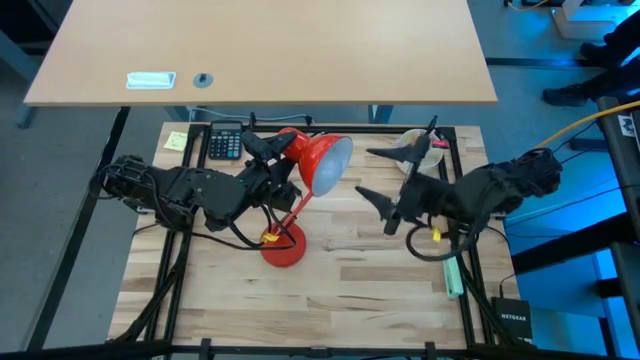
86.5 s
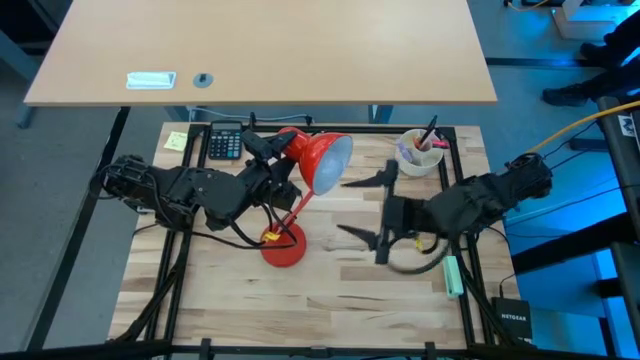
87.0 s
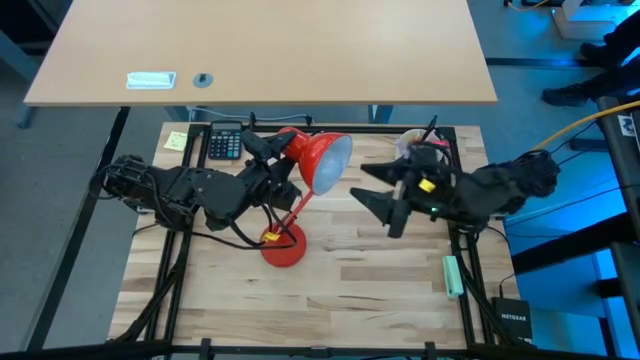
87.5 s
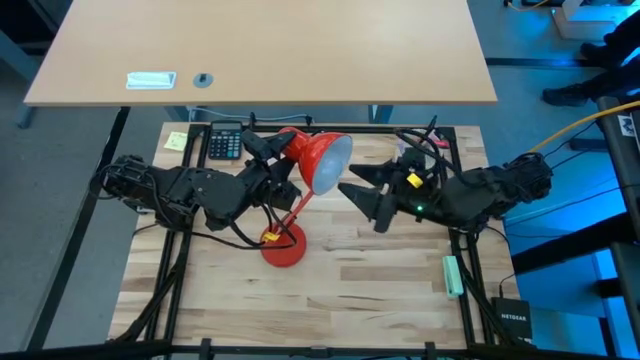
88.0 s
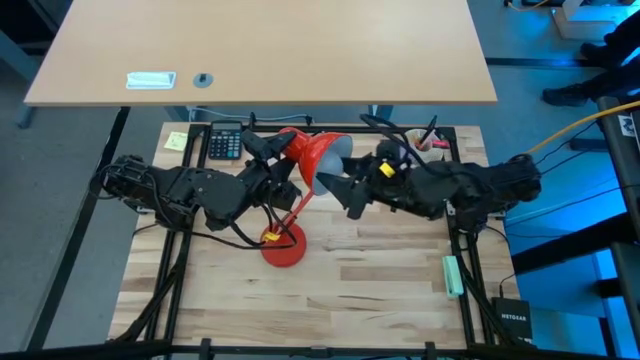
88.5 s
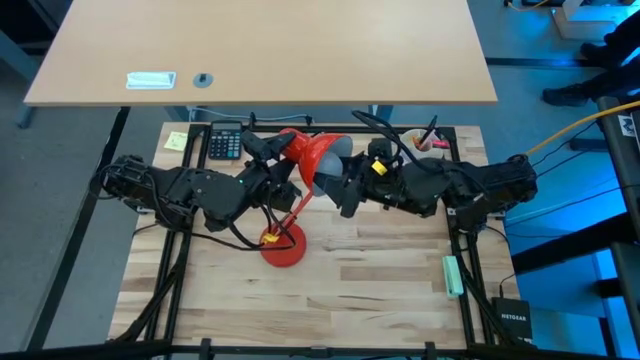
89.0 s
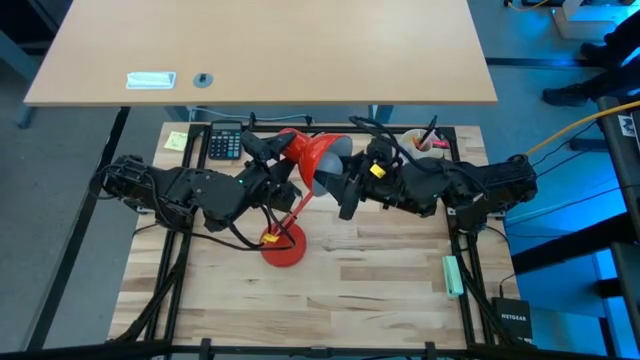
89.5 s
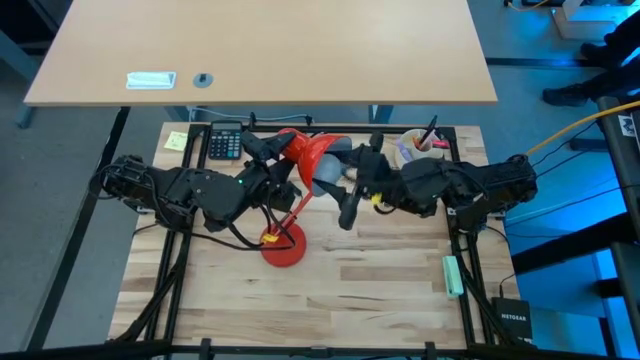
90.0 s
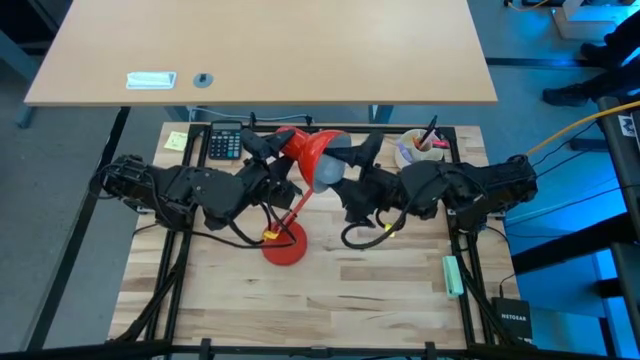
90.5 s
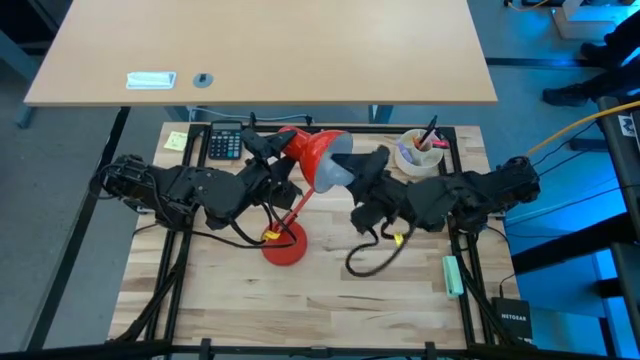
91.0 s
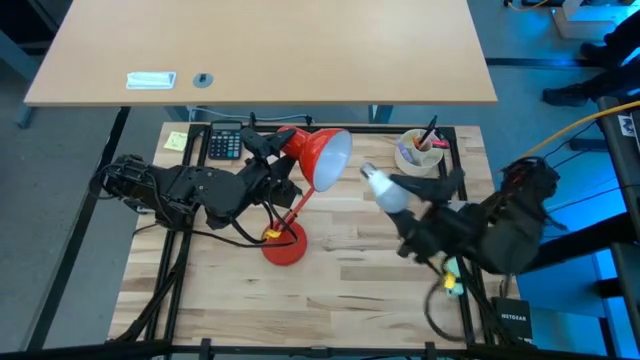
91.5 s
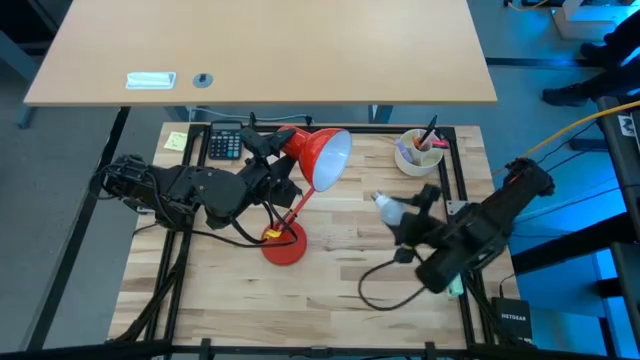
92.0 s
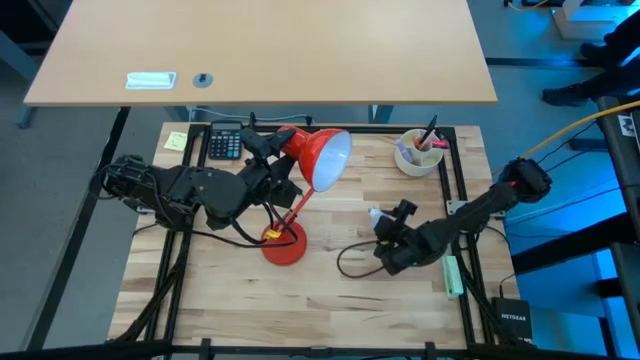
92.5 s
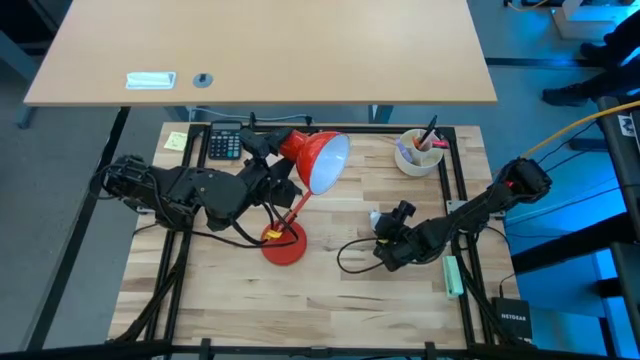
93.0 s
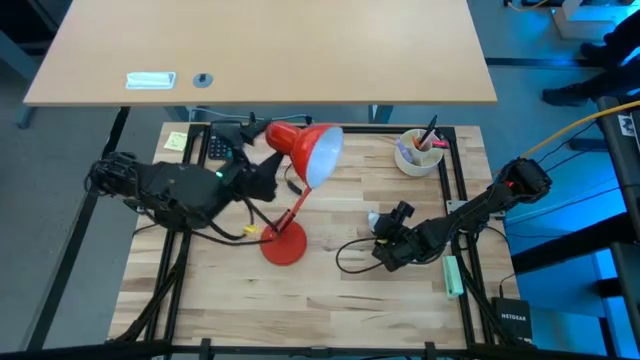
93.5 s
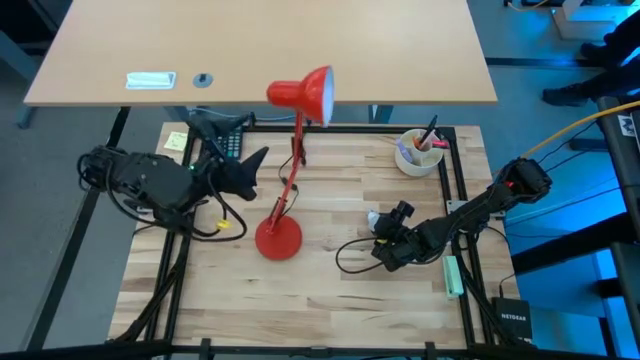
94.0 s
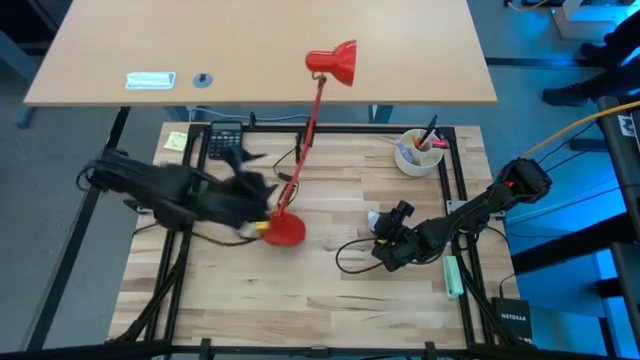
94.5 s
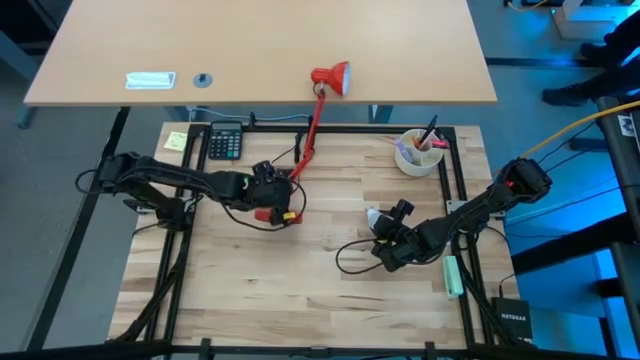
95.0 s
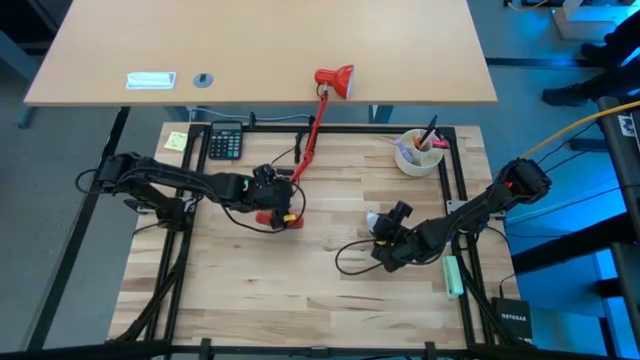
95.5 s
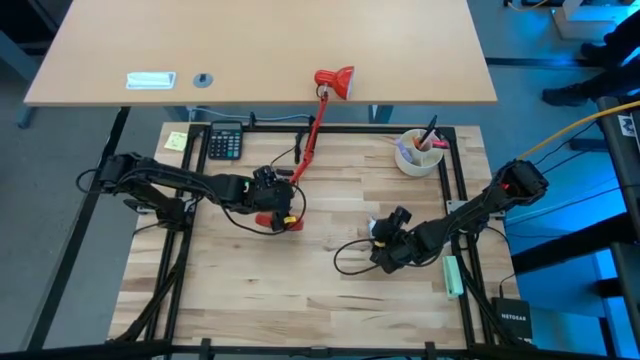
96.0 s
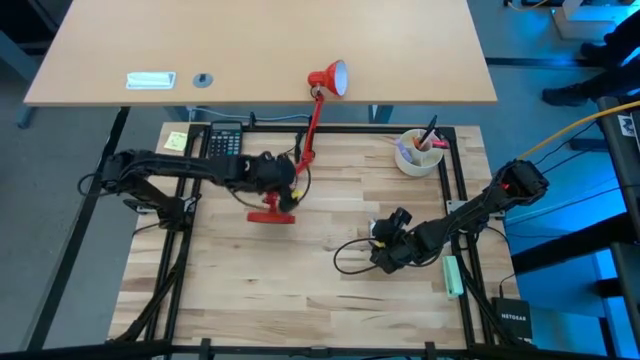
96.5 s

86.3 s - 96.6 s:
Task: Screw lightbulb
Remove the light bulb from the lamp

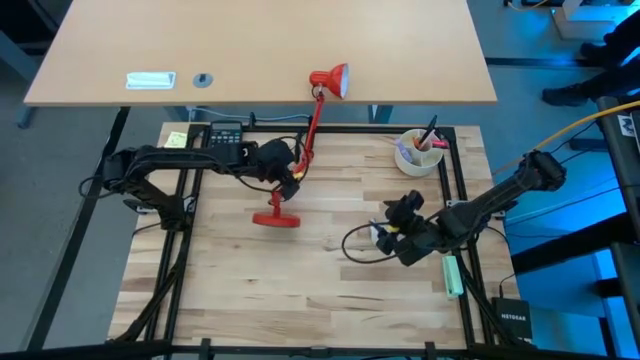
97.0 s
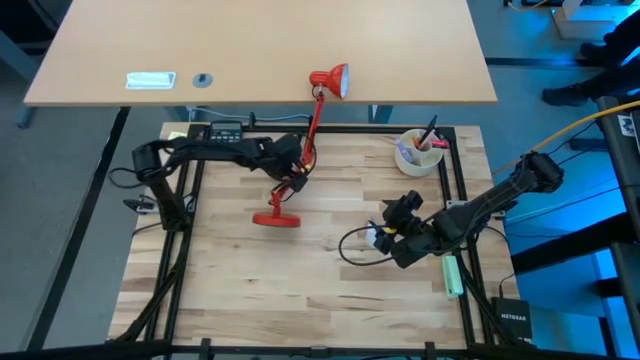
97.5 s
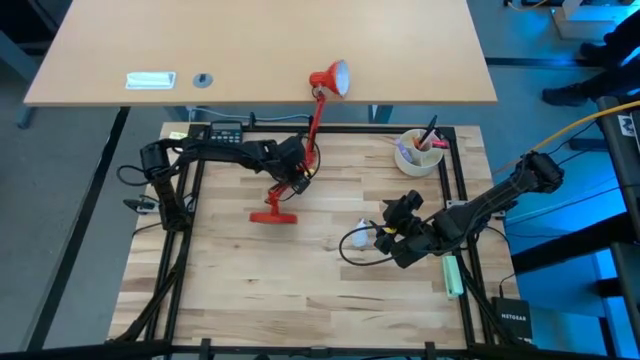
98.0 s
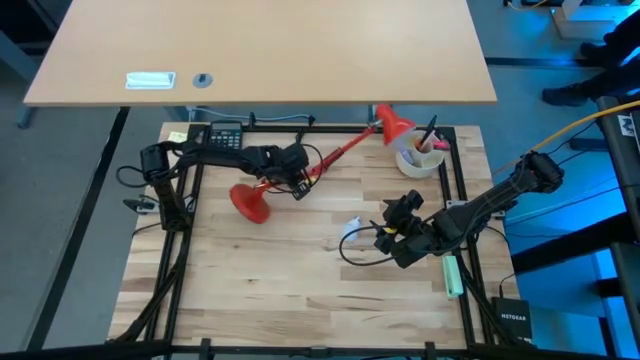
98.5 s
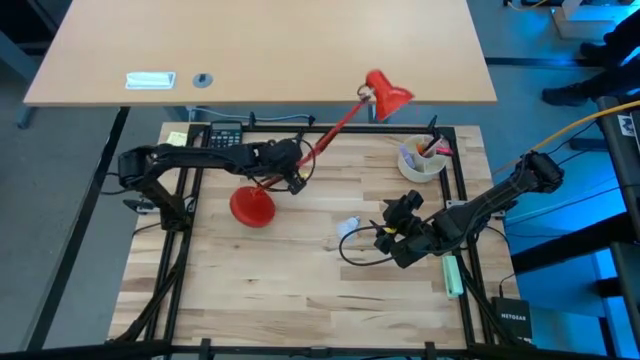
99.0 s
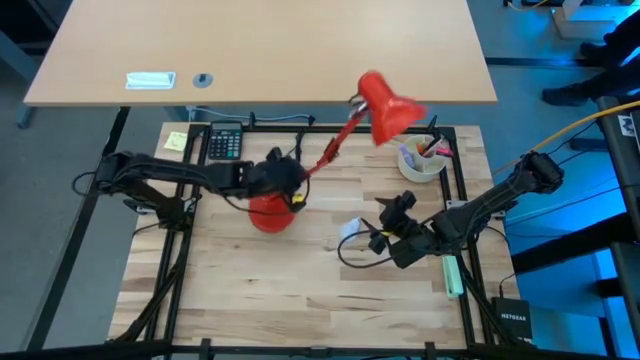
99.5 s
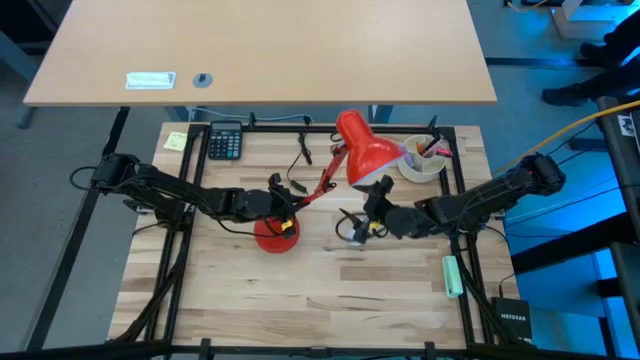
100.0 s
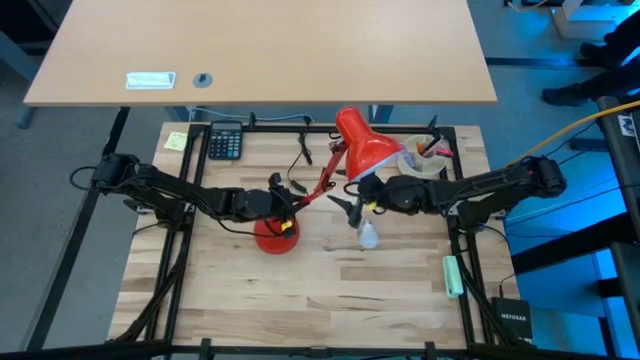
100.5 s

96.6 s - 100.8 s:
Adjust the lamp

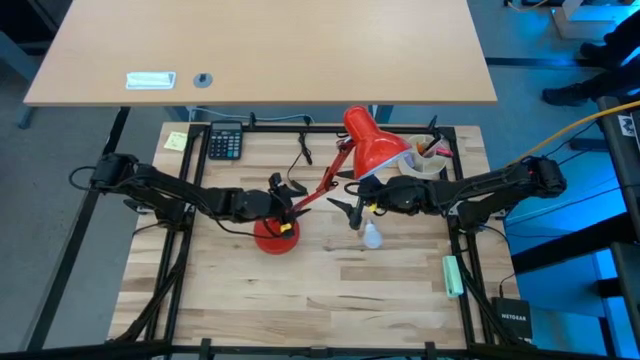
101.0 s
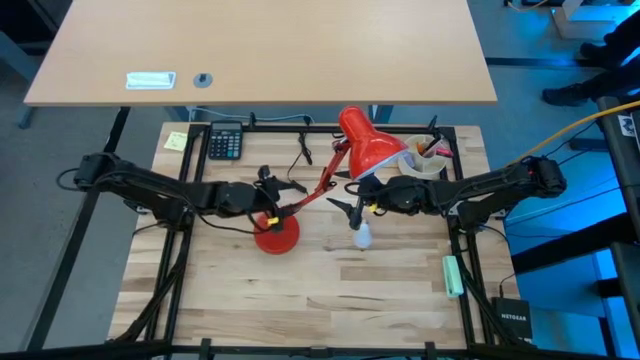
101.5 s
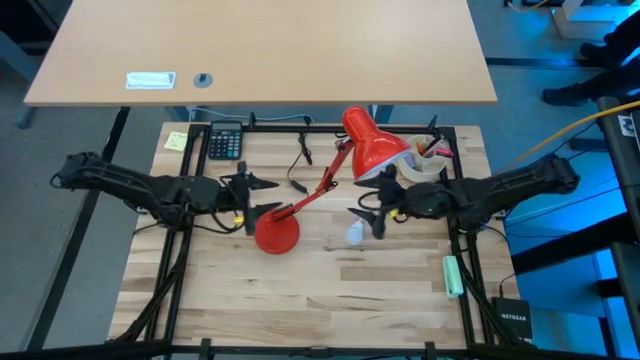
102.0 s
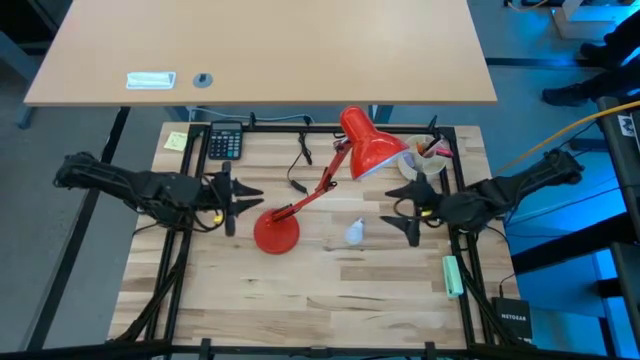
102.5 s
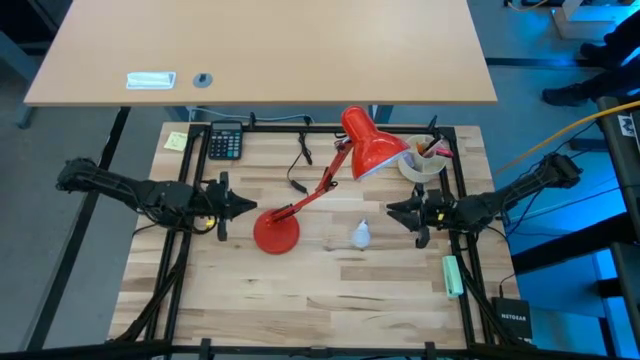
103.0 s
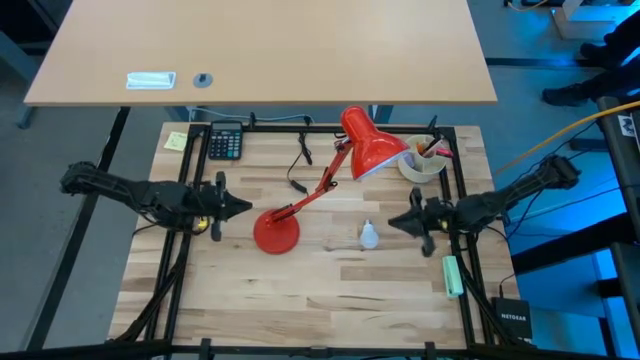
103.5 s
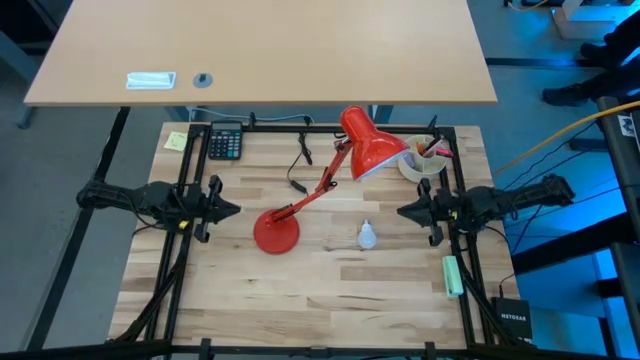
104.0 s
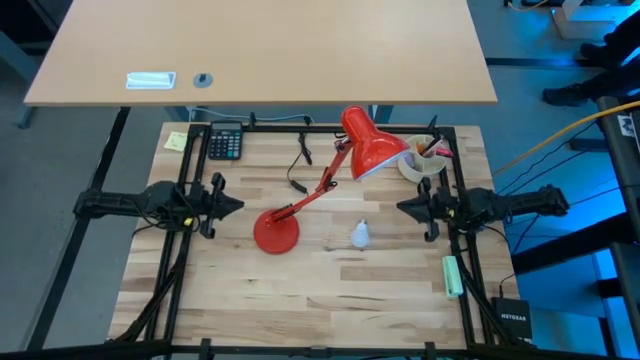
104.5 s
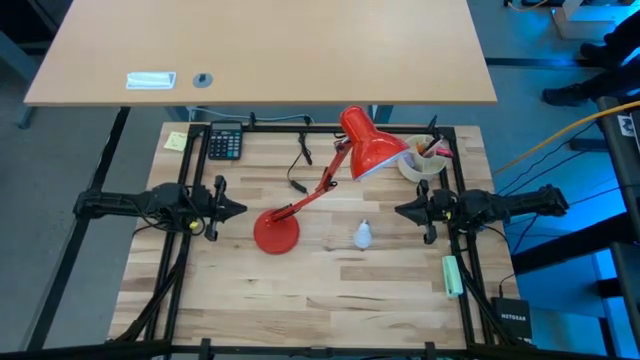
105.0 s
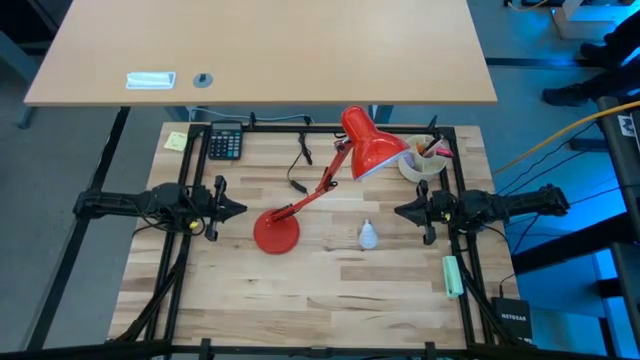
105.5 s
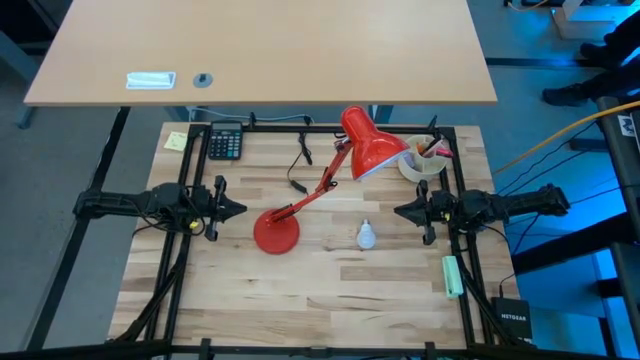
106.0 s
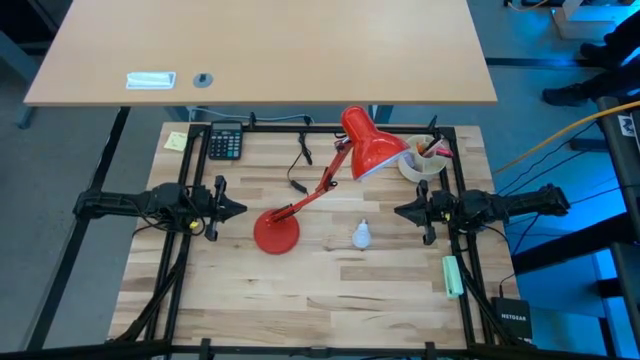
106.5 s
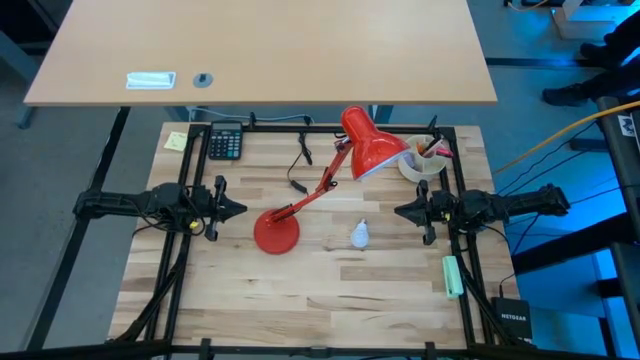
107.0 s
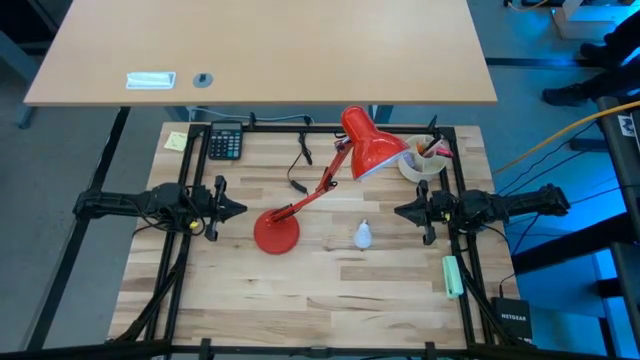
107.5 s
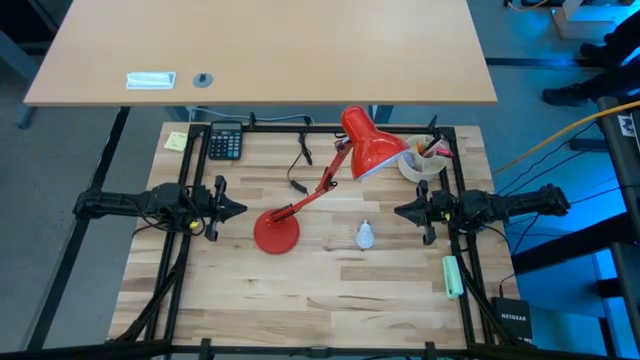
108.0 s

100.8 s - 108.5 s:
Return to home Position
